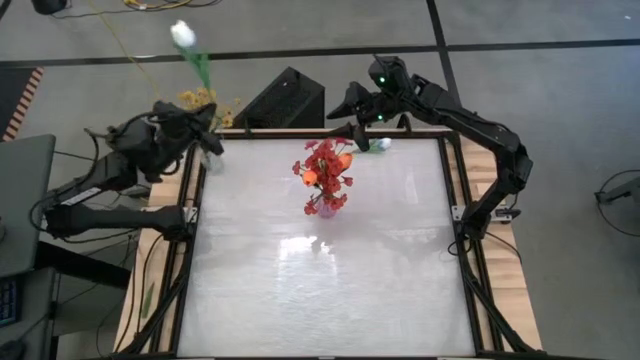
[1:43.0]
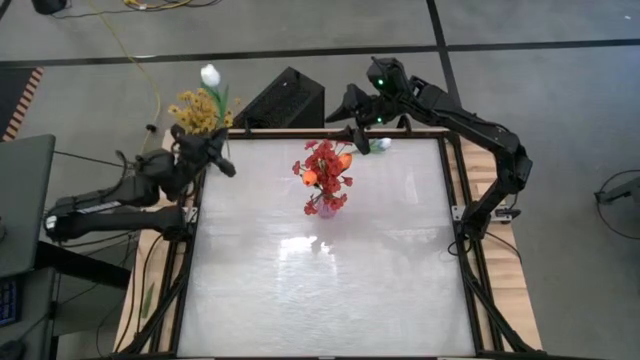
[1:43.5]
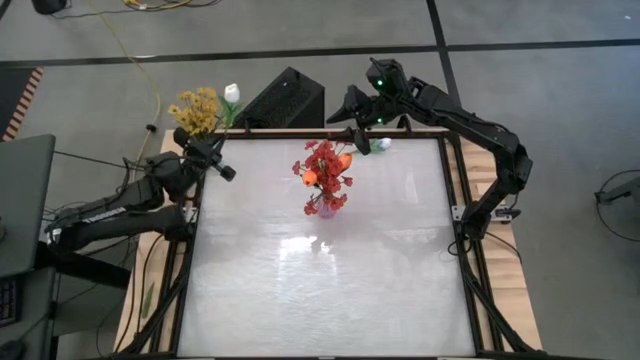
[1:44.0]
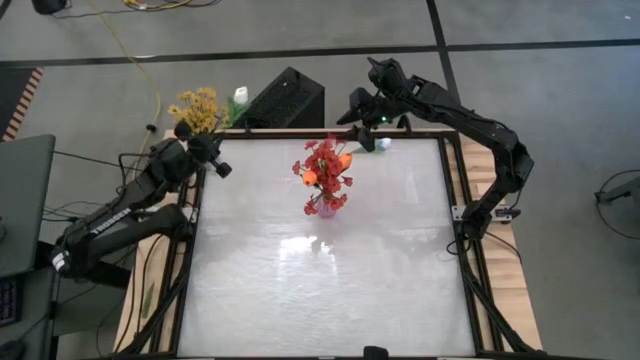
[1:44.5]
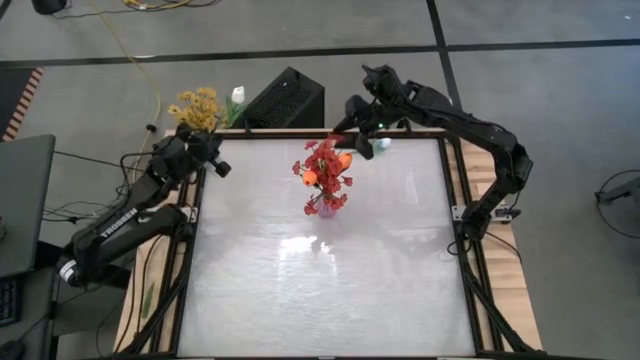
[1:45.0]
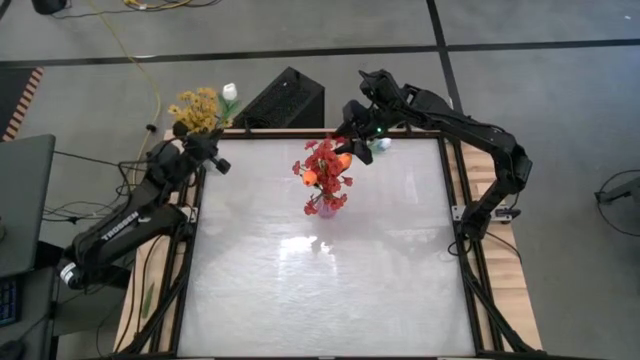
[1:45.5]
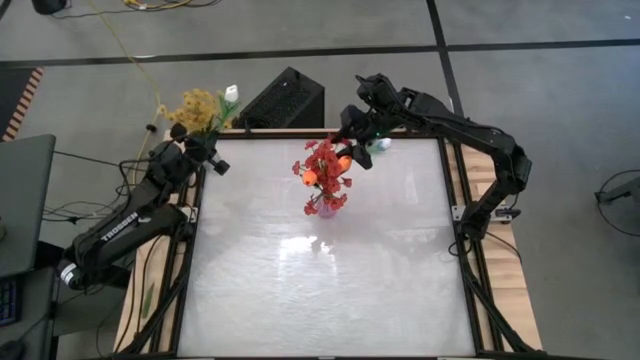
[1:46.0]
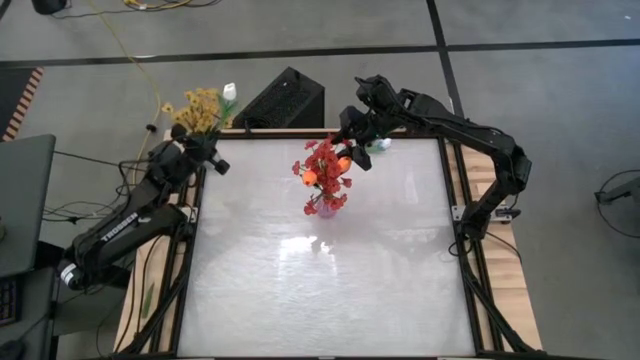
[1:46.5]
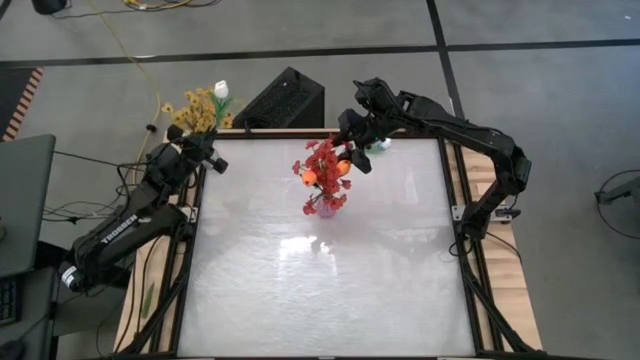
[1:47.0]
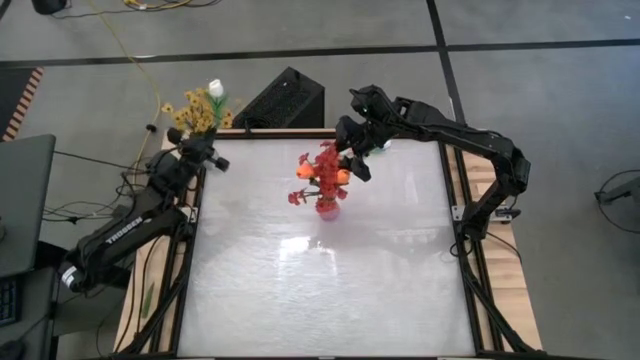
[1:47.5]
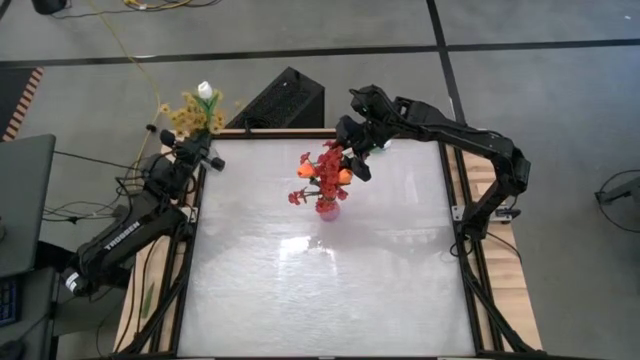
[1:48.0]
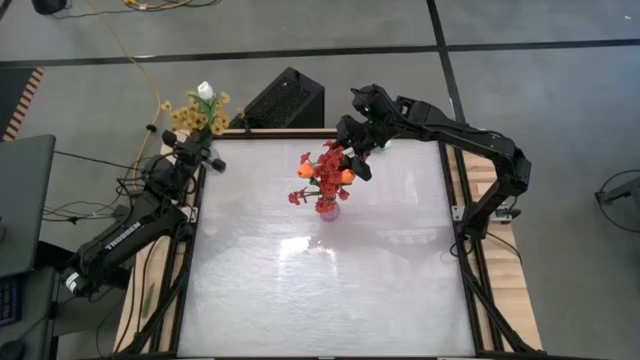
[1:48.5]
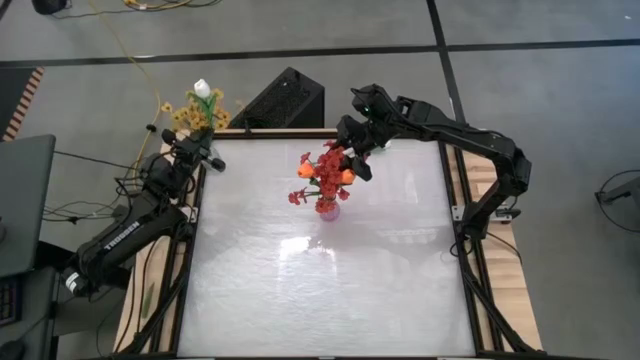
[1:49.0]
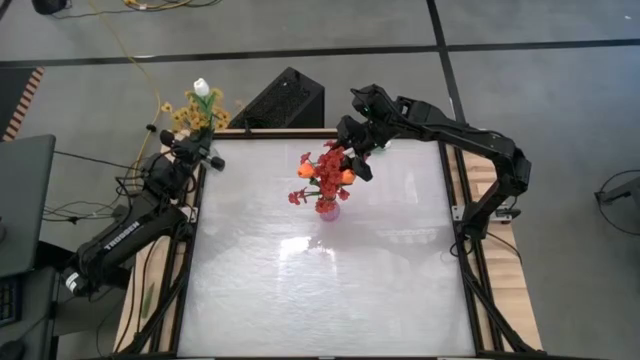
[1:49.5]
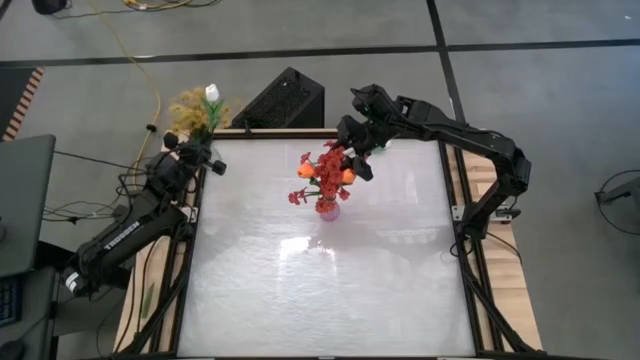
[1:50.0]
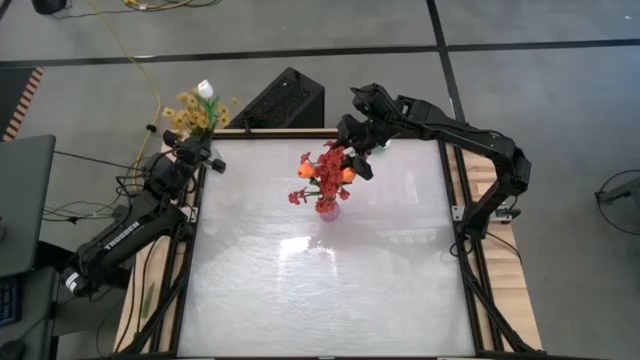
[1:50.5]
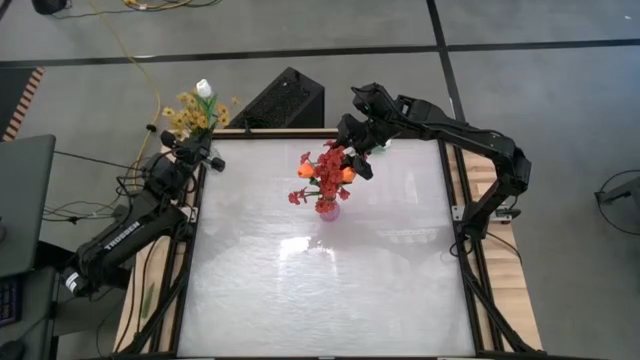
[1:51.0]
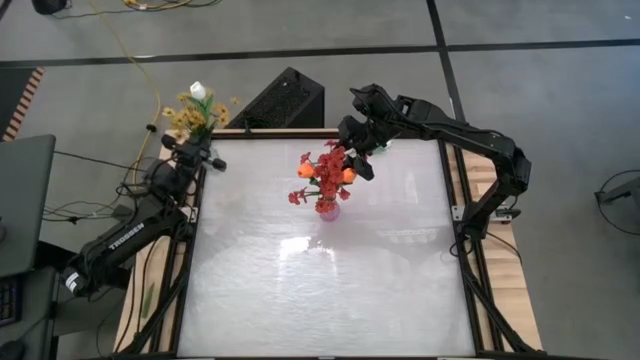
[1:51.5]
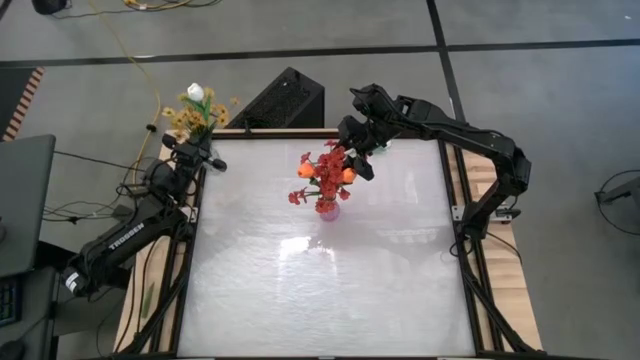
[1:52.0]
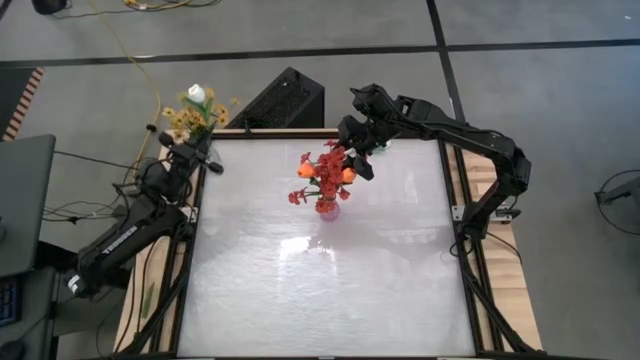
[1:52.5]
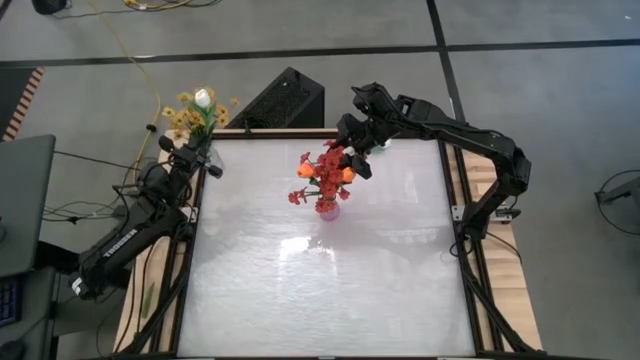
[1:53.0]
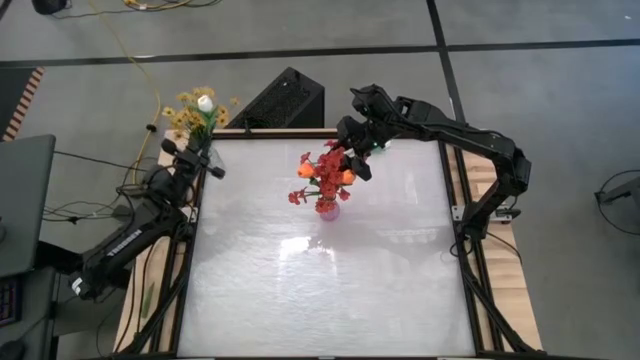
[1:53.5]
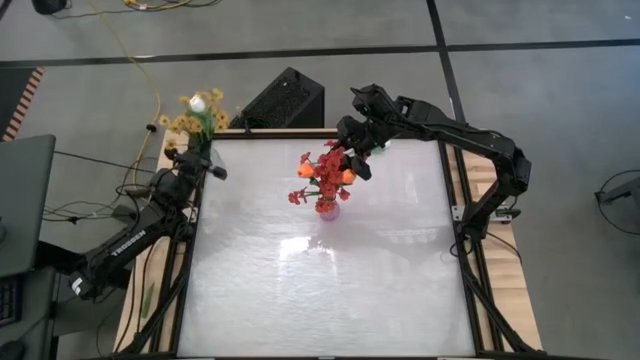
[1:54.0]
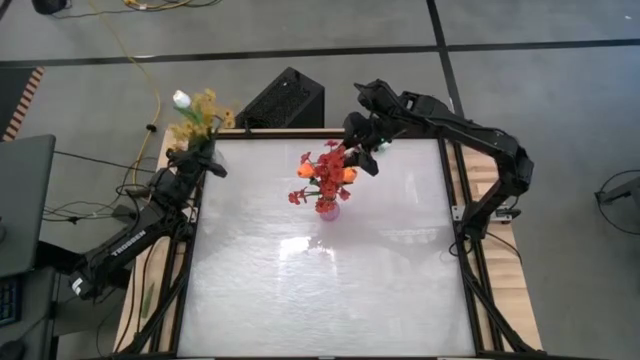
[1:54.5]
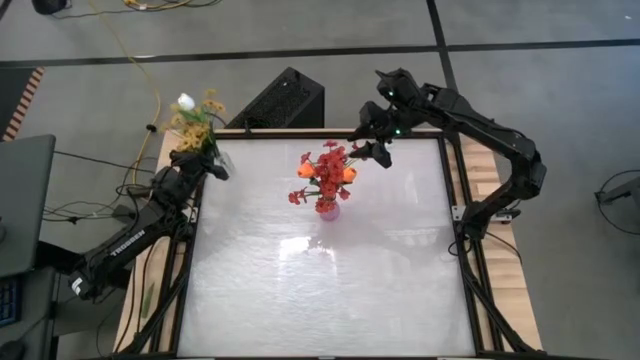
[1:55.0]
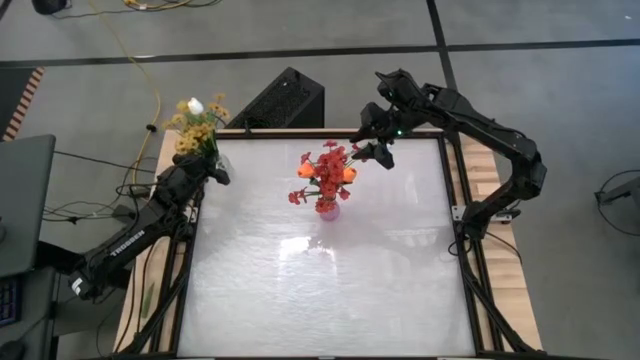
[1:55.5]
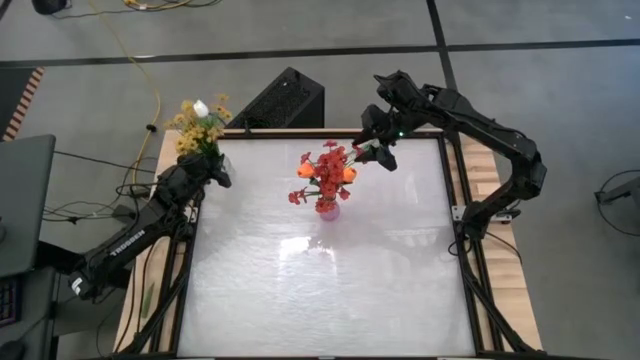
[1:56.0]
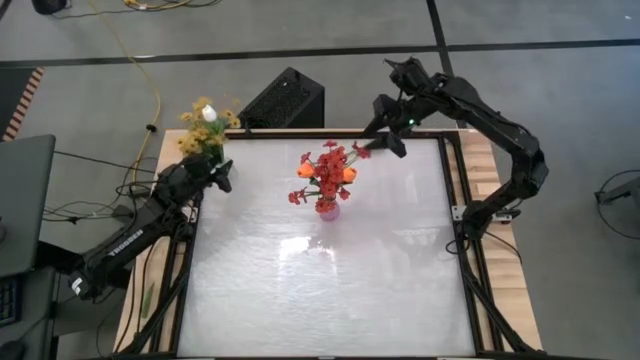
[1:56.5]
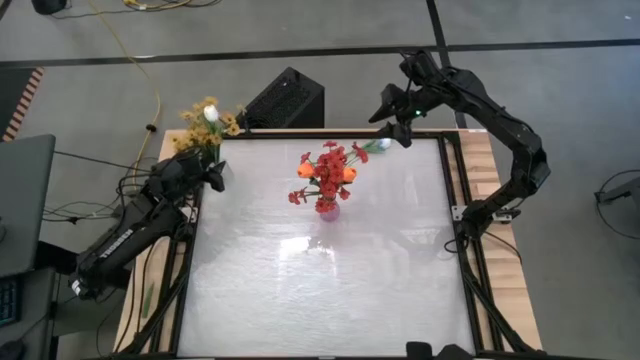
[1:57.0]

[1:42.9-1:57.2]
Task: Sort flowers into vase by color
Put the bottom white tulip into the transparent vase

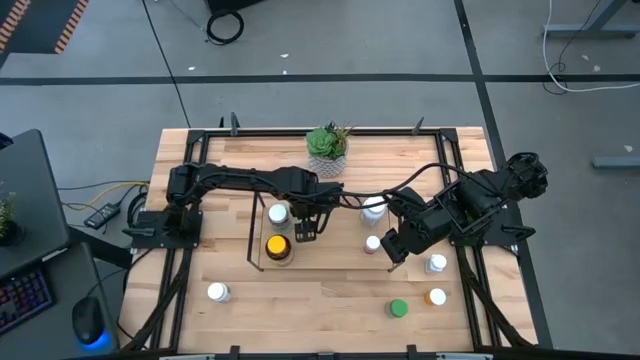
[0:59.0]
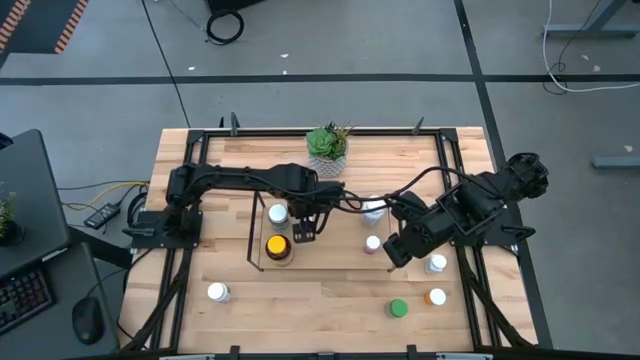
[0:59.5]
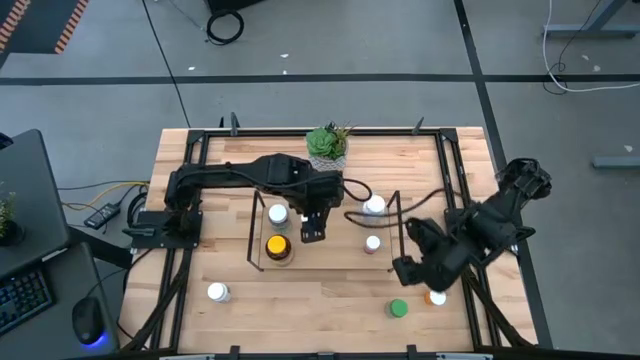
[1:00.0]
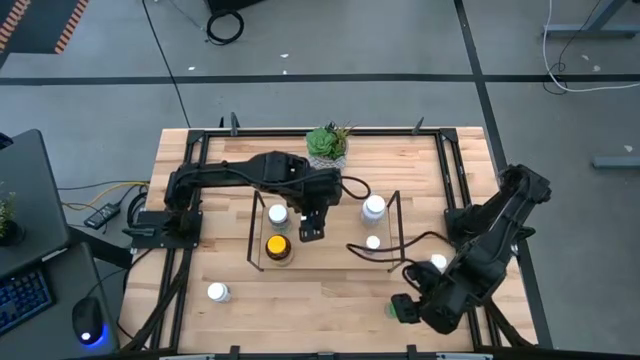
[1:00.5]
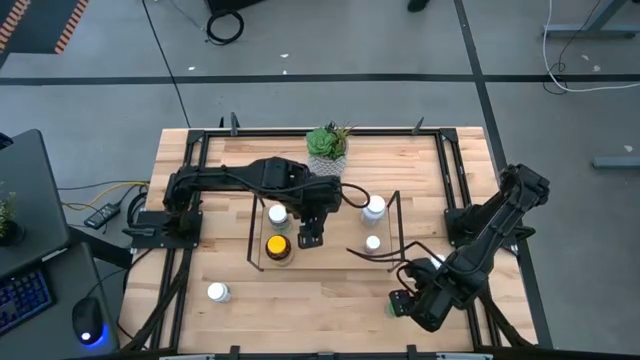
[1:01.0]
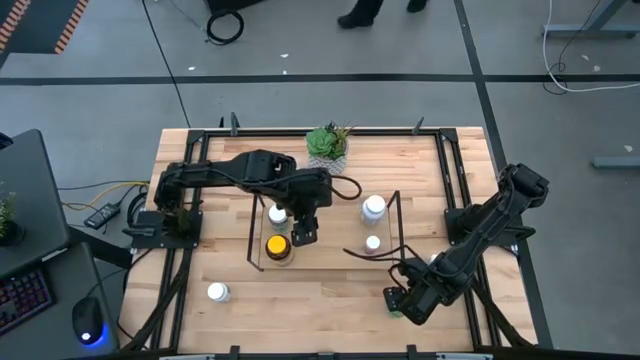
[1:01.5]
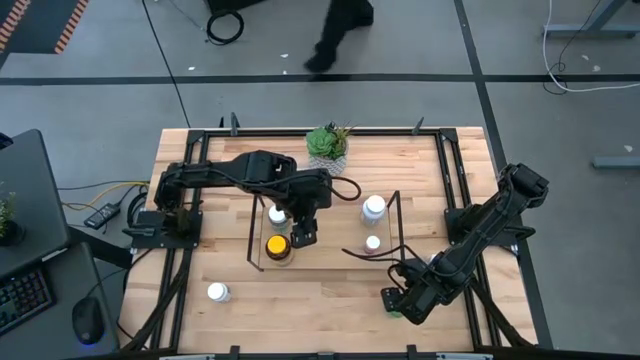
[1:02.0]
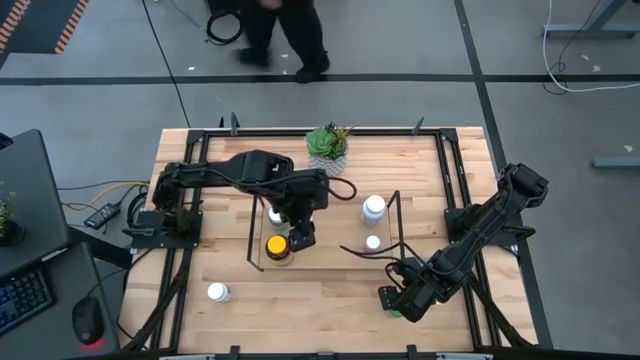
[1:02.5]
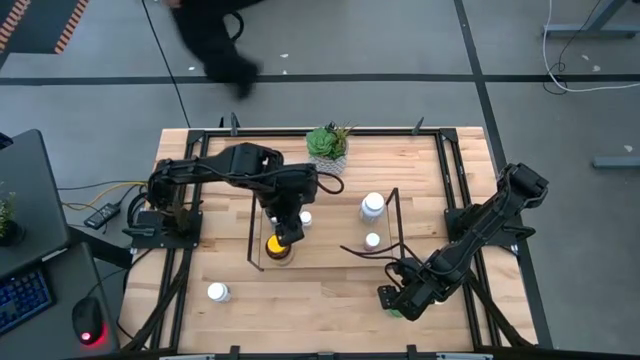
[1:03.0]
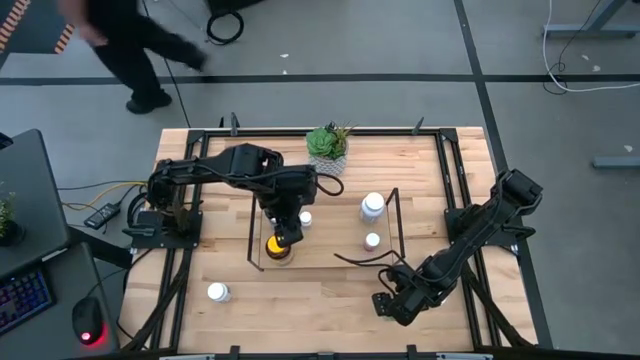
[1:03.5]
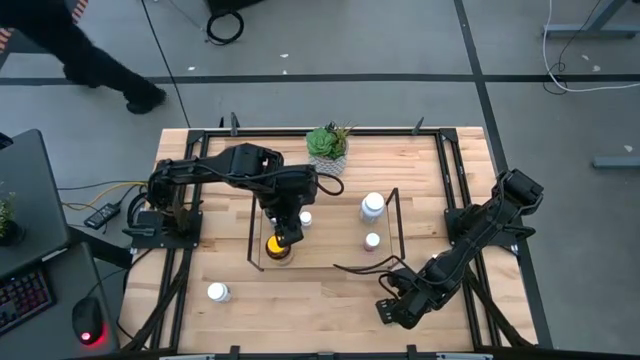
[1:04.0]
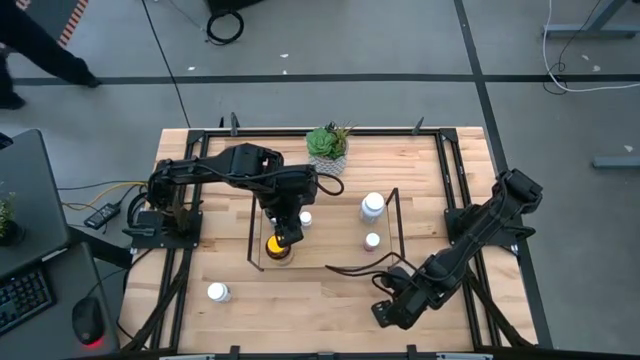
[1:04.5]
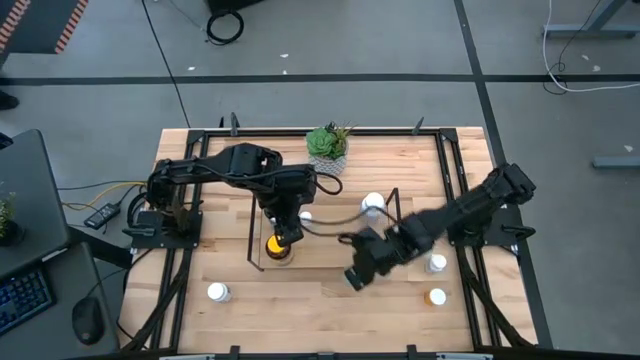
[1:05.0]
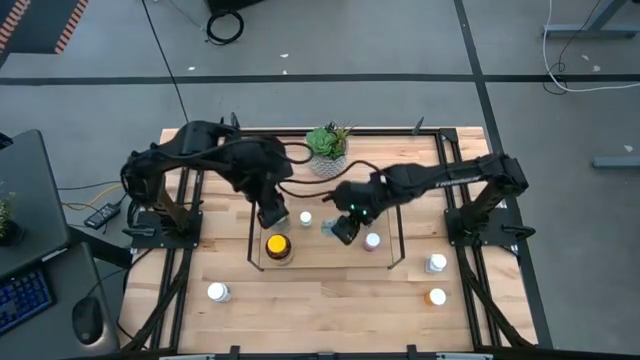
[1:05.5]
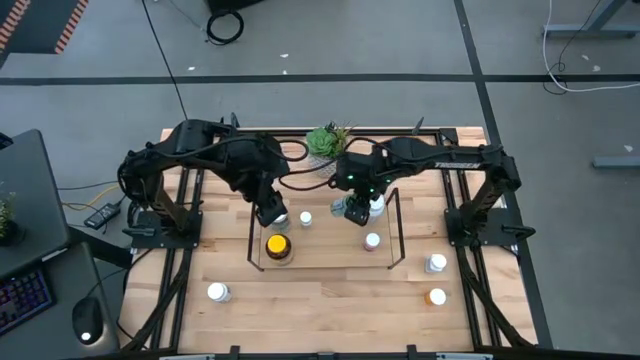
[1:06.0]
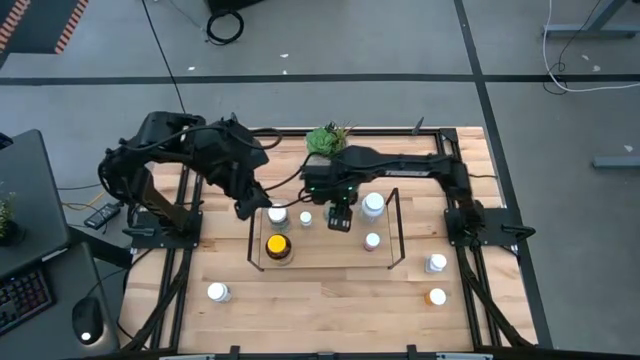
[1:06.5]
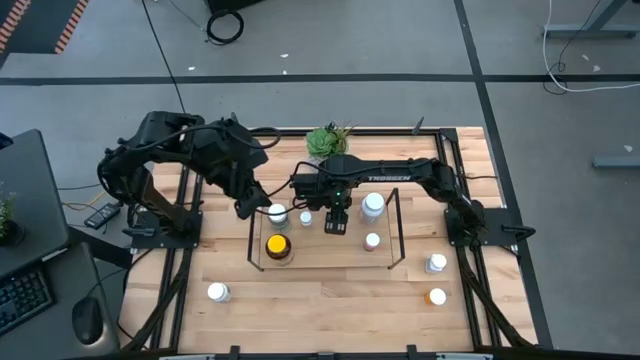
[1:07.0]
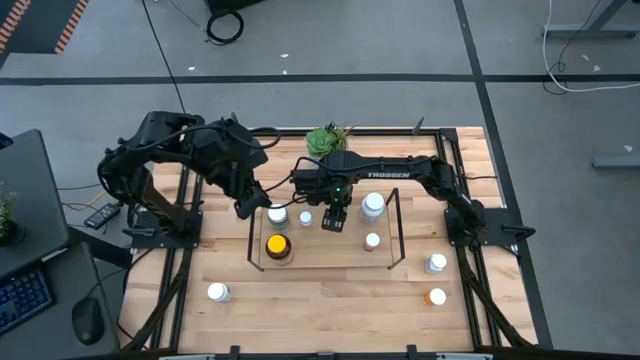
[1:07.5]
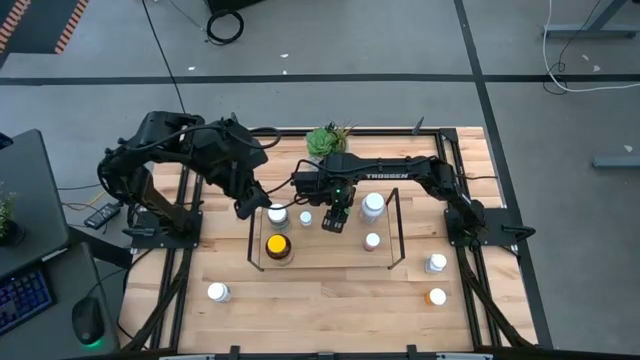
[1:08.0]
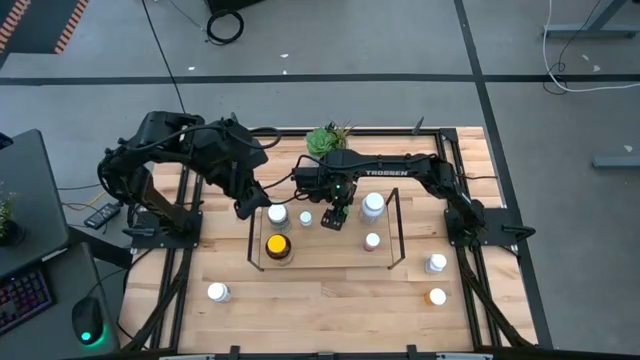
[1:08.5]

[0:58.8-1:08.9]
Task: Pick and place medicine bottles onto shelf by color
Put the small green medicine bottle on the shelf
